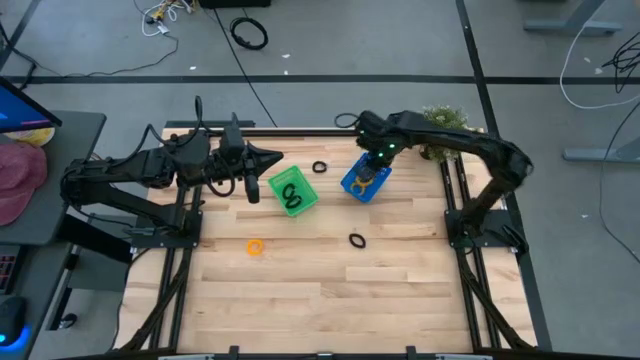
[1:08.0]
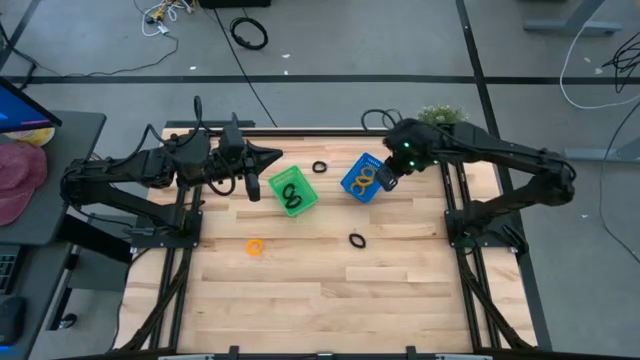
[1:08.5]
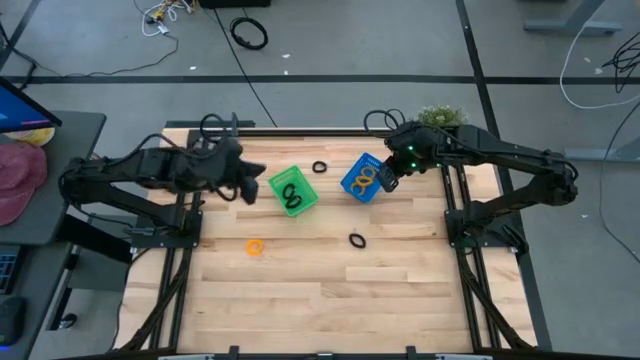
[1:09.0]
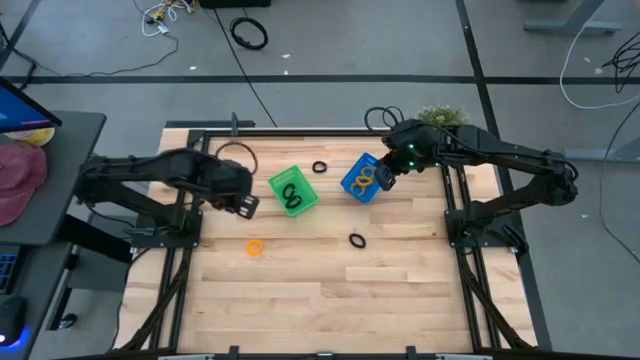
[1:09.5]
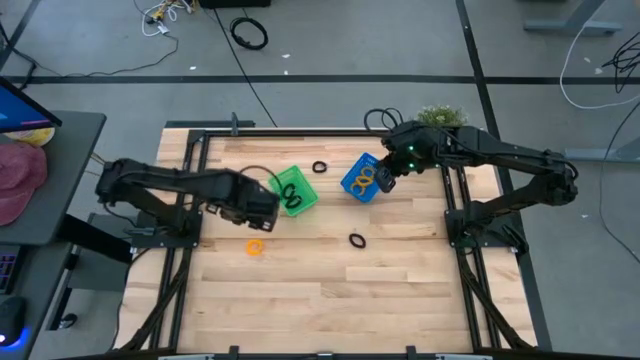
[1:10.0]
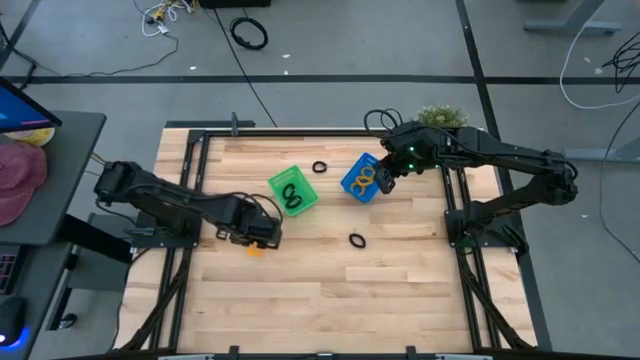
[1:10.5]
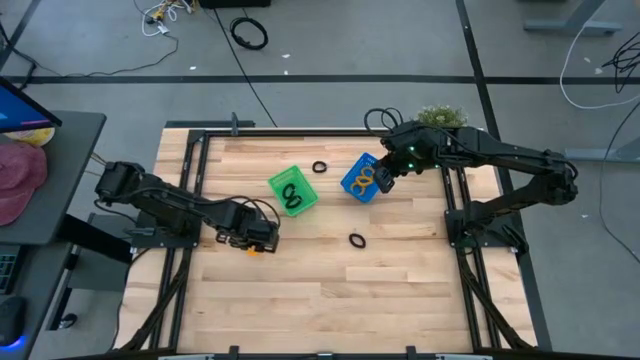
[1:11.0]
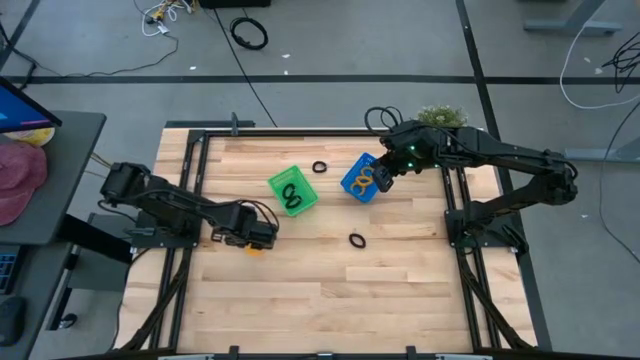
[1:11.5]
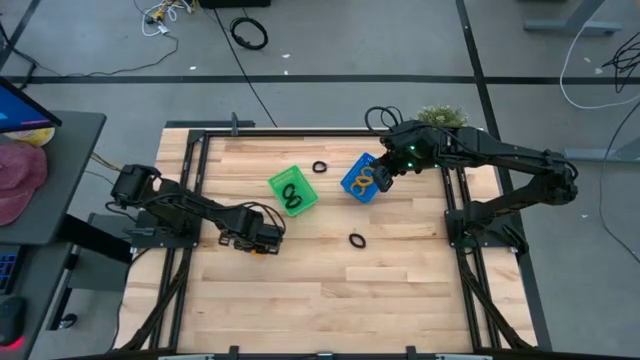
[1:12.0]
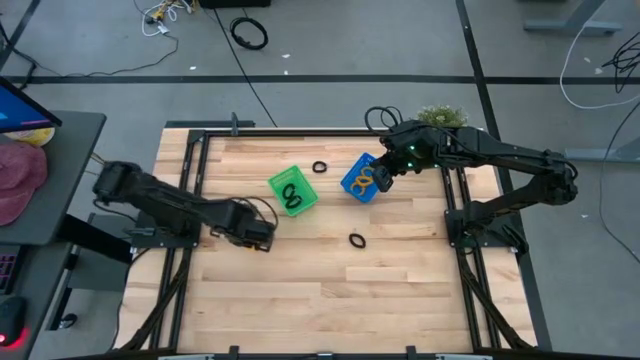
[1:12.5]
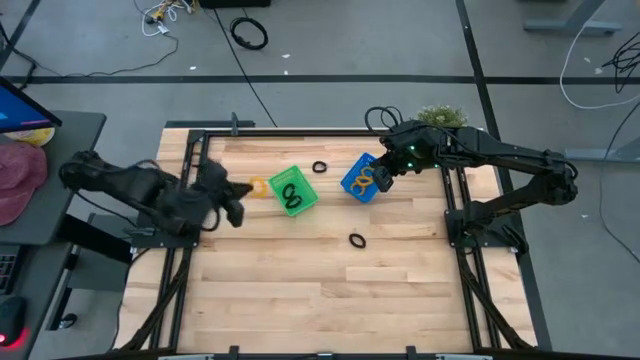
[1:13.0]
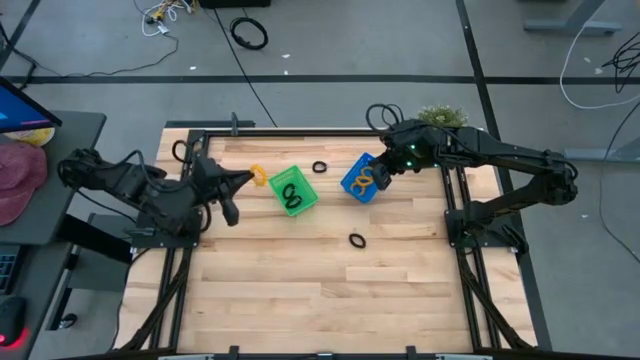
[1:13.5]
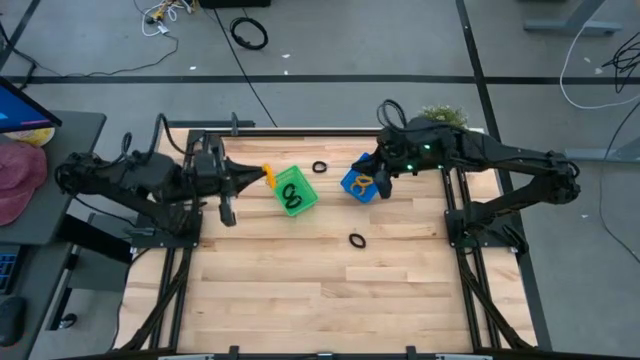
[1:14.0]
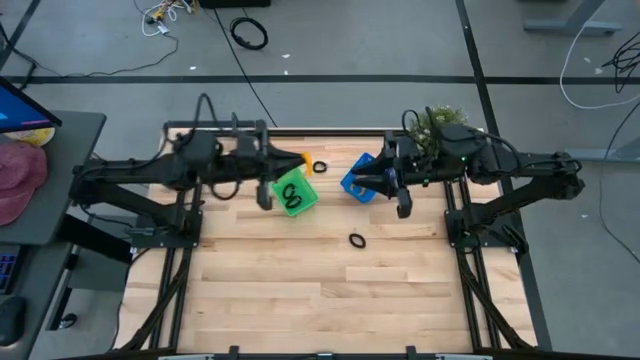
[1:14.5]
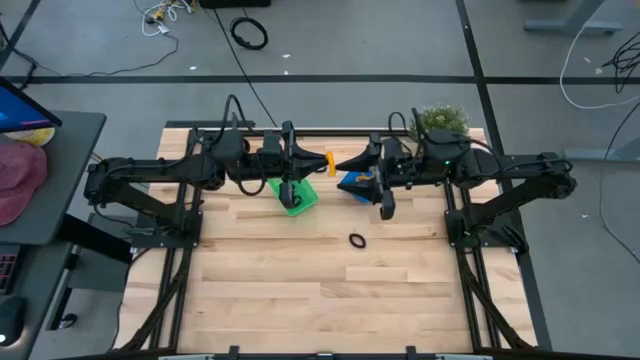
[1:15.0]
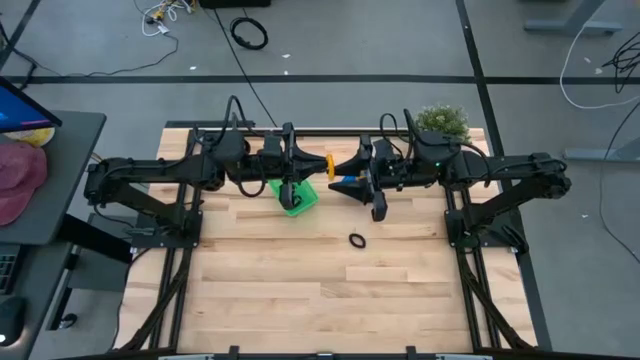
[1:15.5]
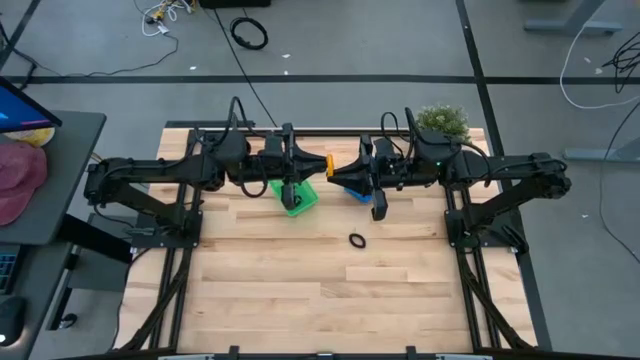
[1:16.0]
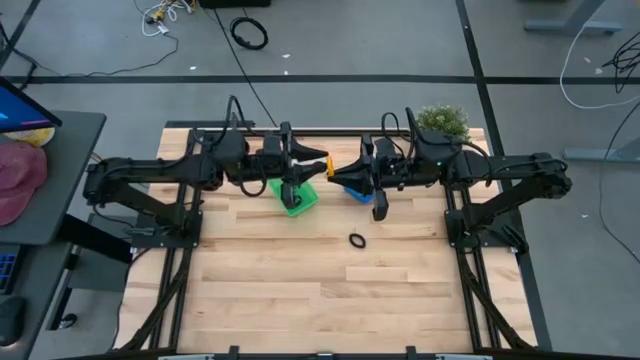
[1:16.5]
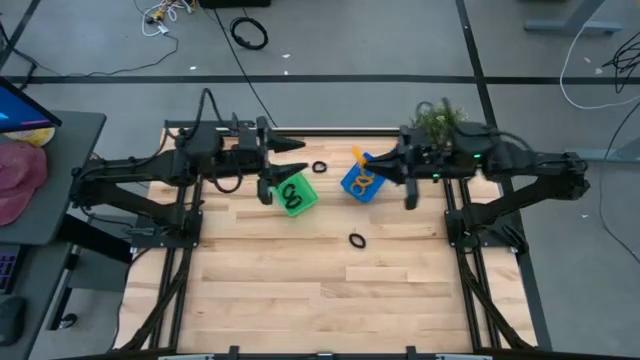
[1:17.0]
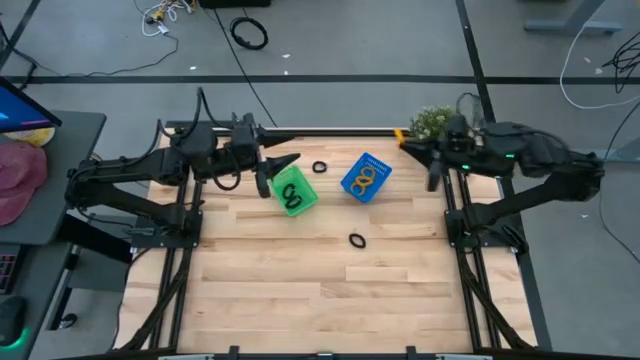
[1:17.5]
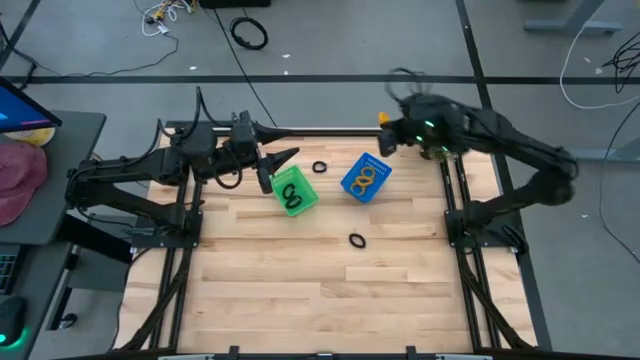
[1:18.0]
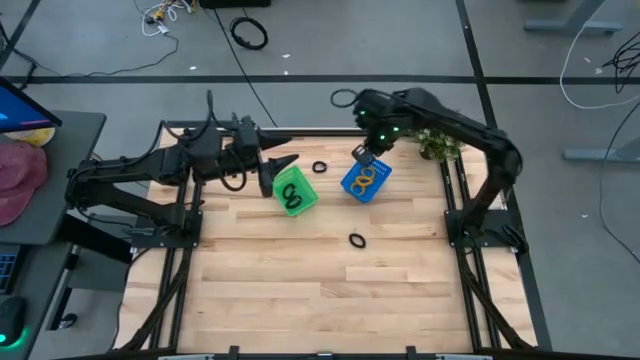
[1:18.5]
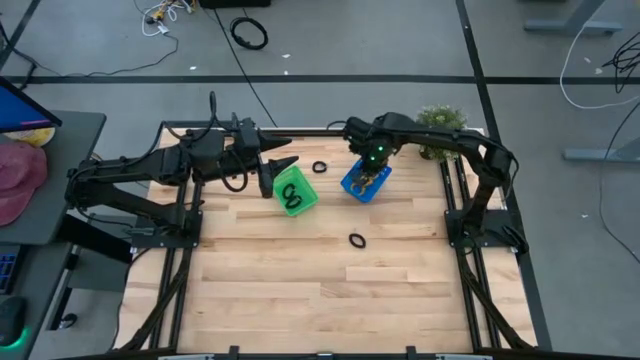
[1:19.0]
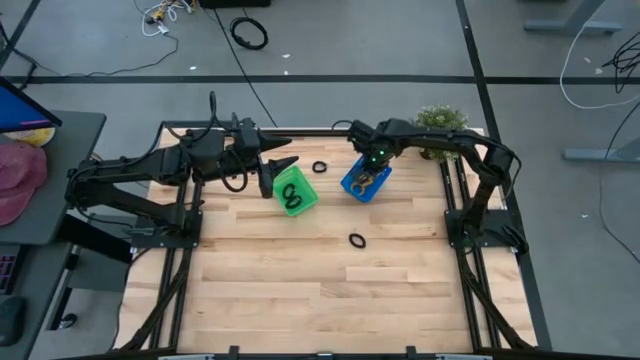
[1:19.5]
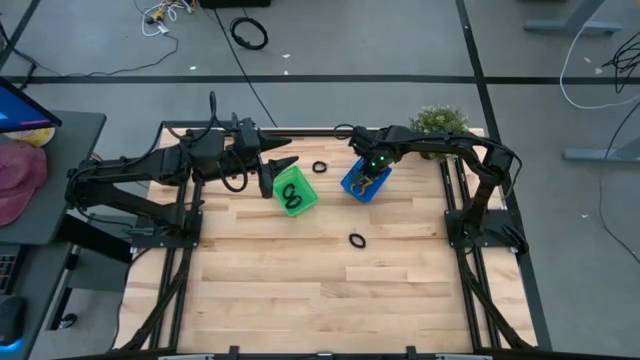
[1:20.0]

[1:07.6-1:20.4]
Task: Sort spring keychains
Put the yellow spring keychain into the blue bin

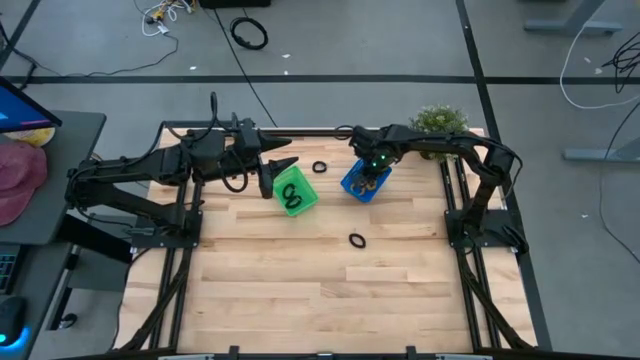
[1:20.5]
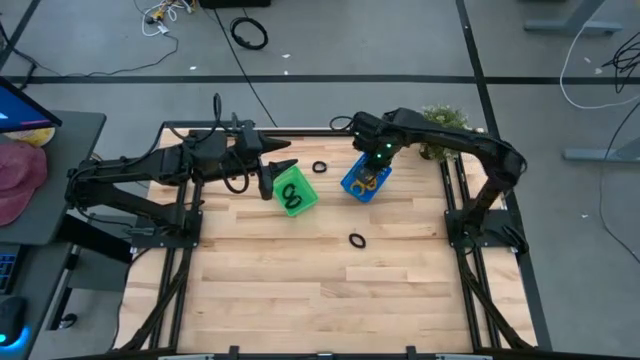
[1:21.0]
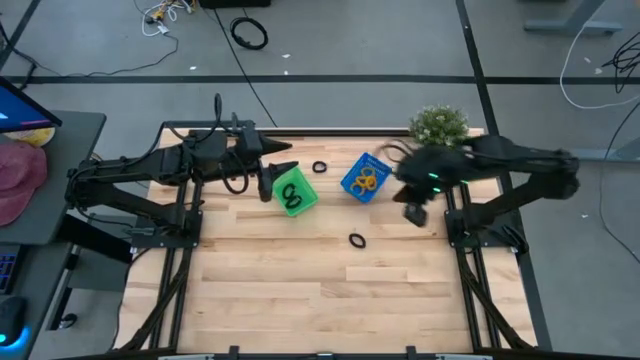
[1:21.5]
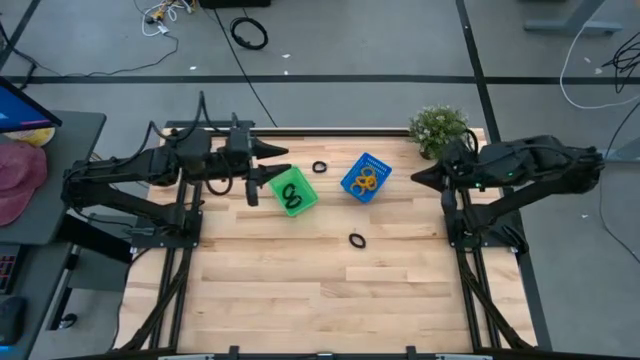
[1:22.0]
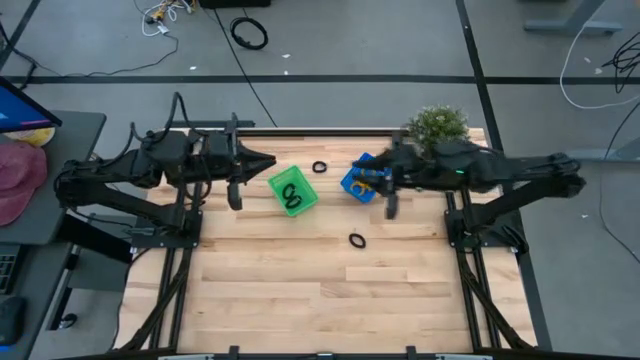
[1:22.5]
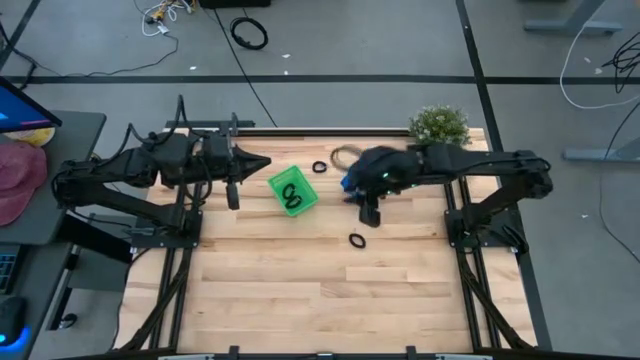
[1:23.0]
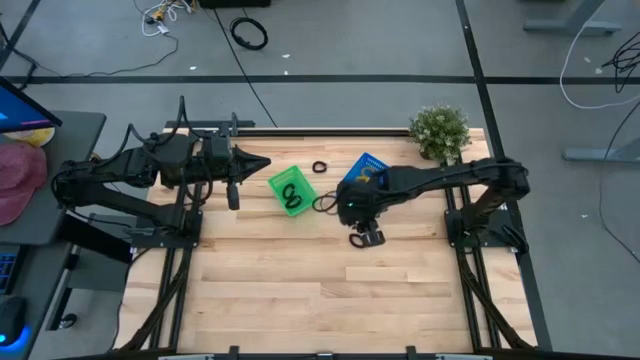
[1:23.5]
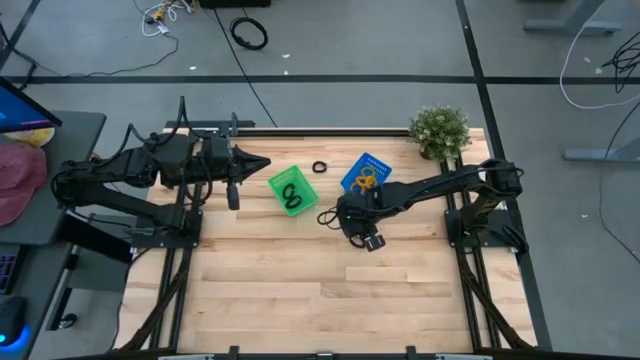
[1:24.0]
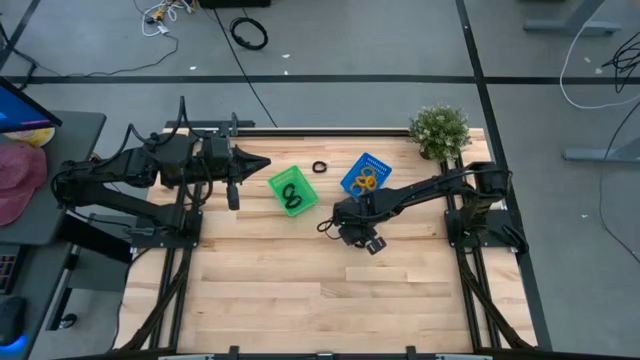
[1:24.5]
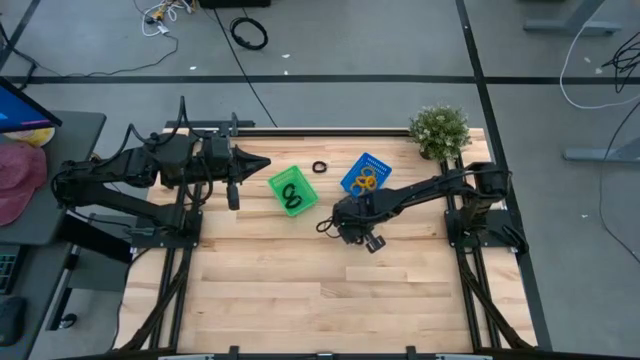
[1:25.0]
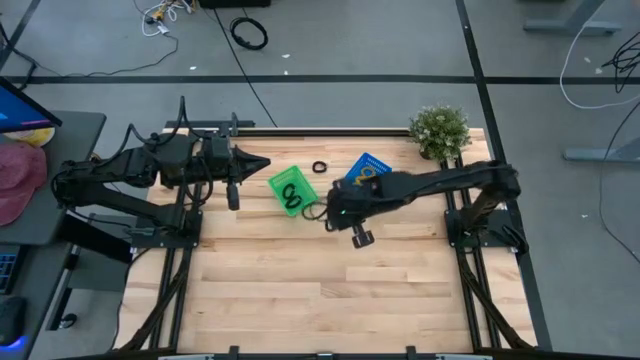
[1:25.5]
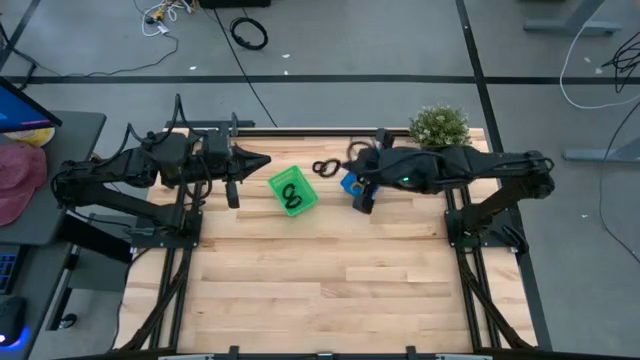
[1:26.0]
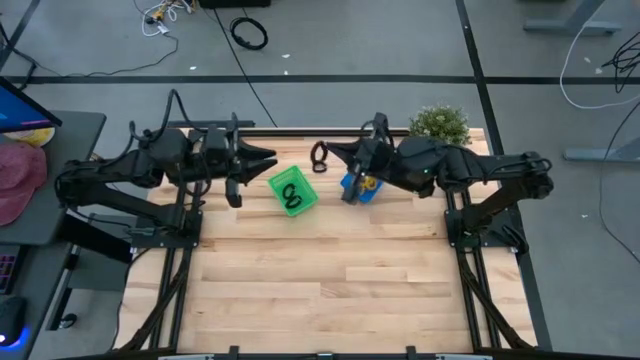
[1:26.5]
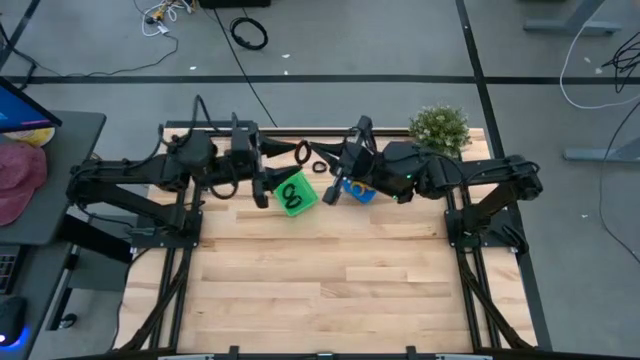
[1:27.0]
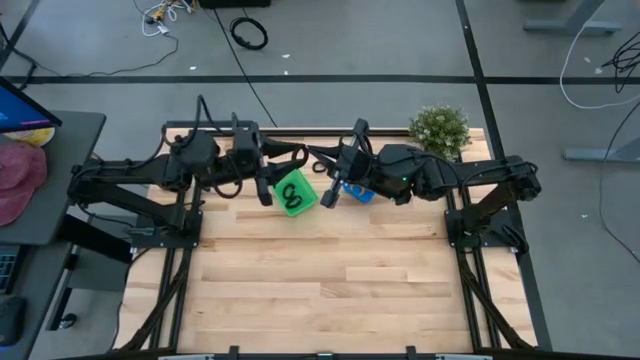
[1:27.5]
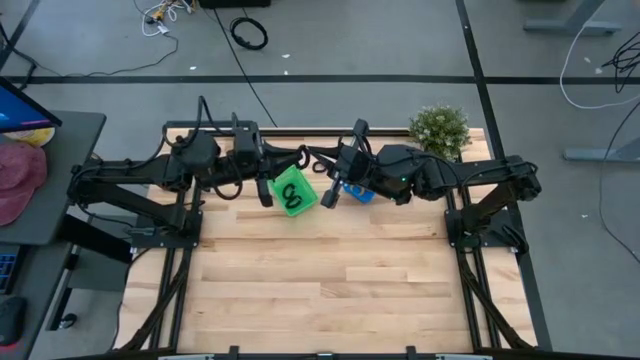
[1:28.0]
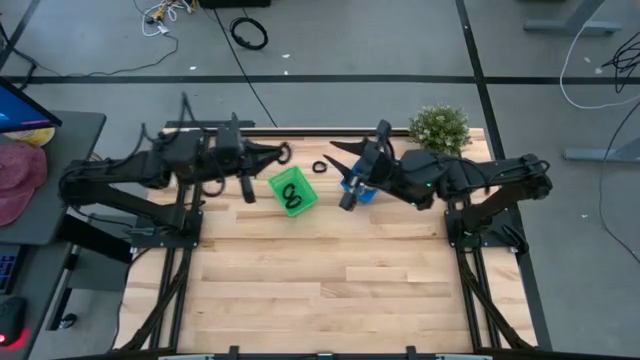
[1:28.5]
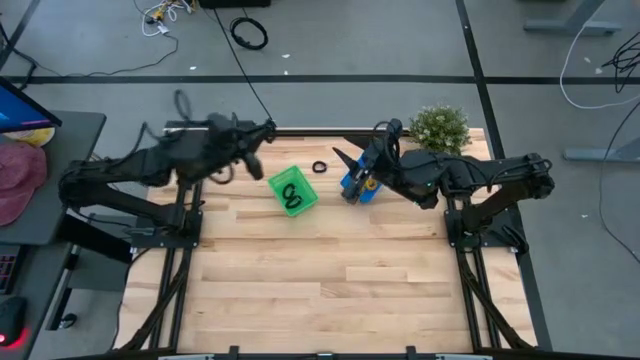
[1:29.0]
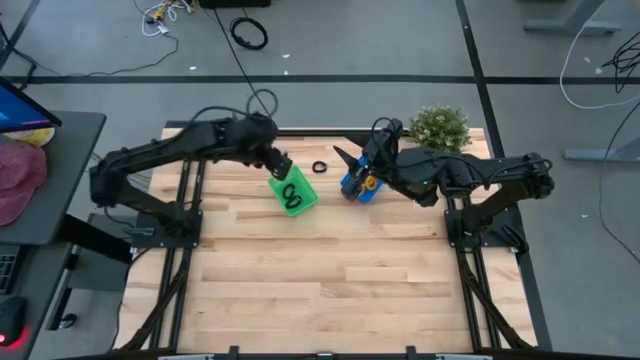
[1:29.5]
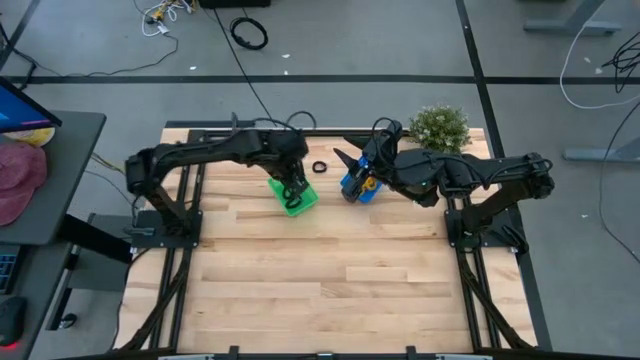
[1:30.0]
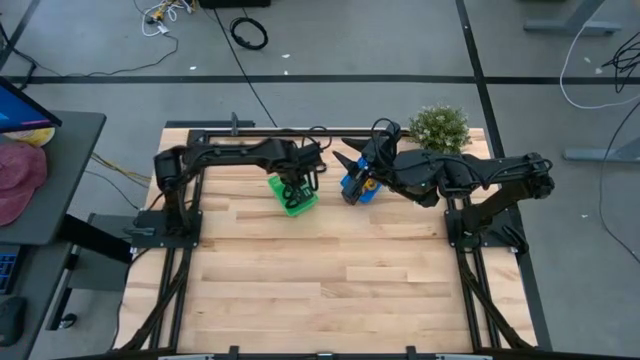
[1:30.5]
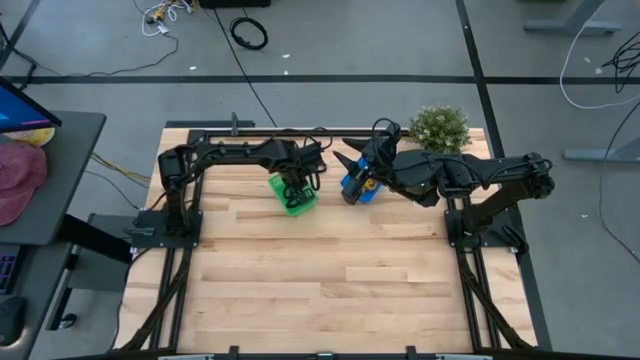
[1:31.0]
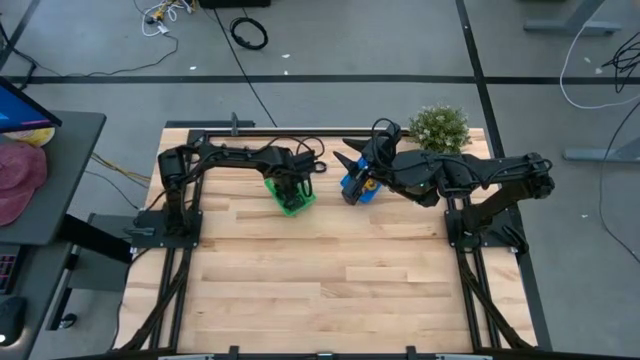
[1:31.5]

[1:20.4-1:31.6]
Put the black spring keychain into the green bin
